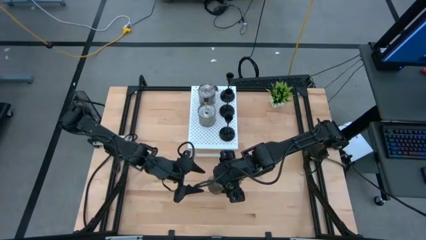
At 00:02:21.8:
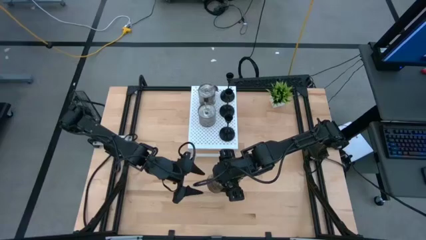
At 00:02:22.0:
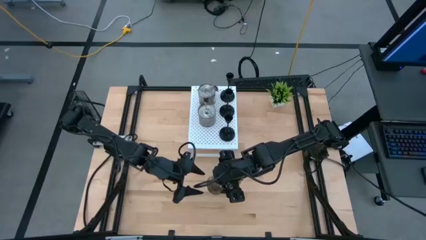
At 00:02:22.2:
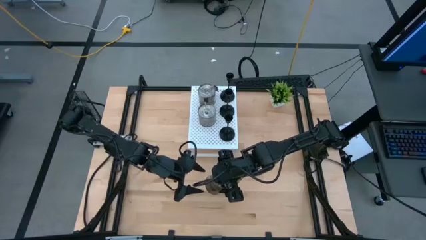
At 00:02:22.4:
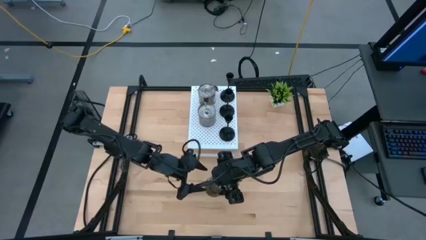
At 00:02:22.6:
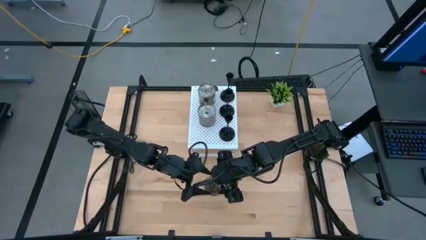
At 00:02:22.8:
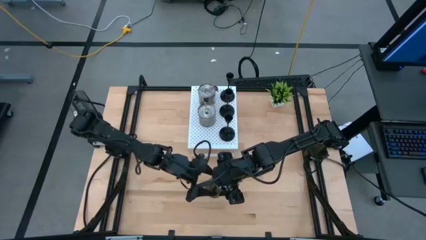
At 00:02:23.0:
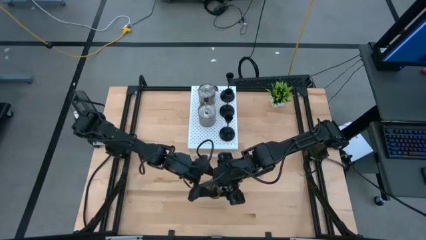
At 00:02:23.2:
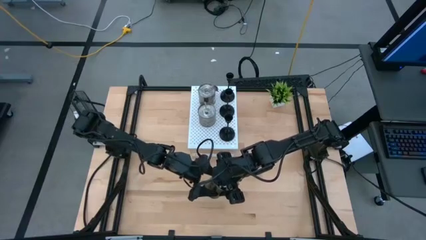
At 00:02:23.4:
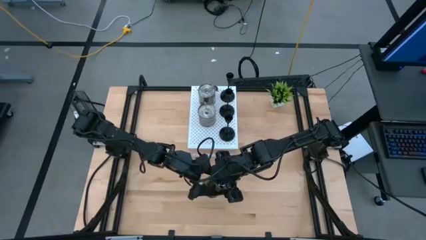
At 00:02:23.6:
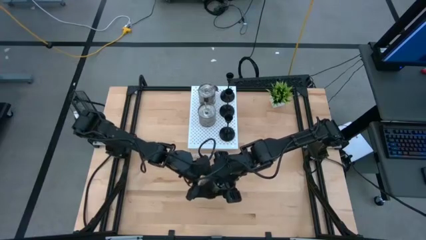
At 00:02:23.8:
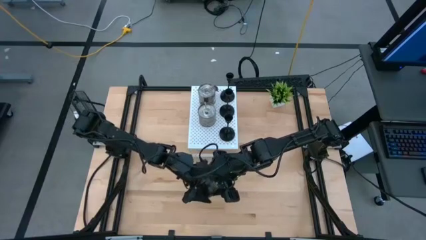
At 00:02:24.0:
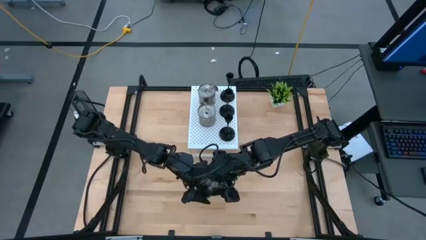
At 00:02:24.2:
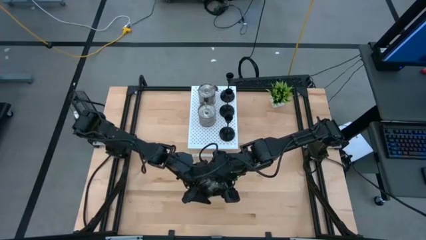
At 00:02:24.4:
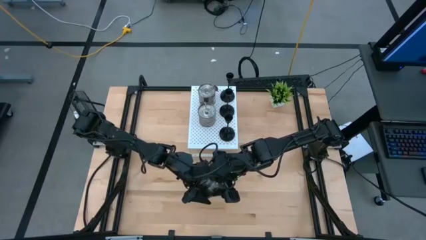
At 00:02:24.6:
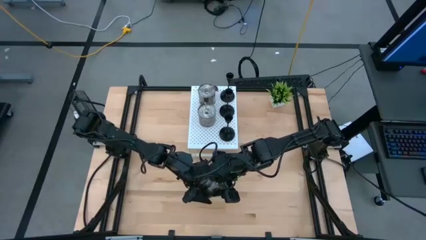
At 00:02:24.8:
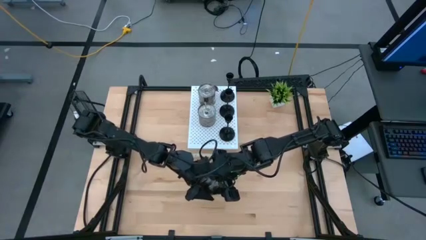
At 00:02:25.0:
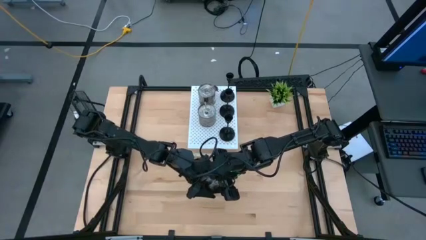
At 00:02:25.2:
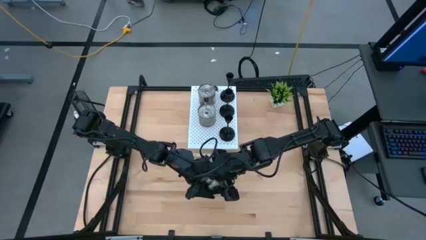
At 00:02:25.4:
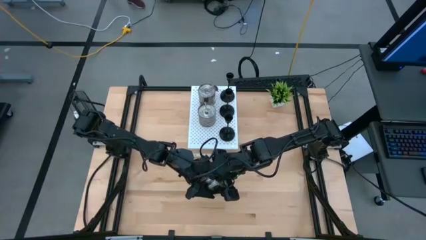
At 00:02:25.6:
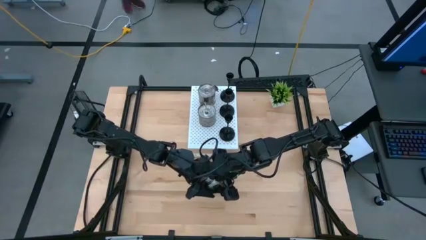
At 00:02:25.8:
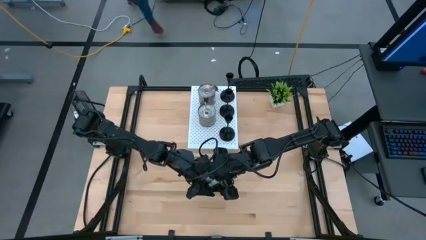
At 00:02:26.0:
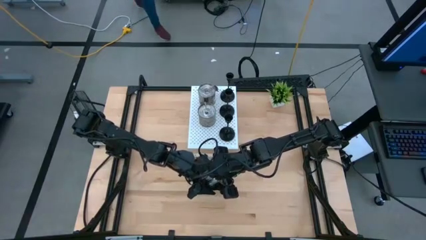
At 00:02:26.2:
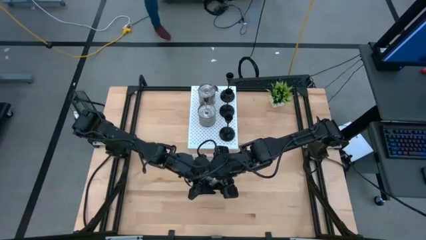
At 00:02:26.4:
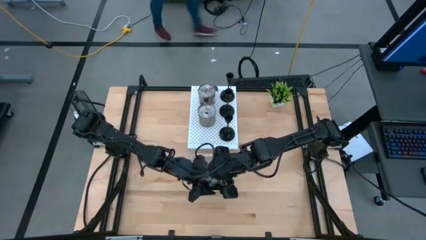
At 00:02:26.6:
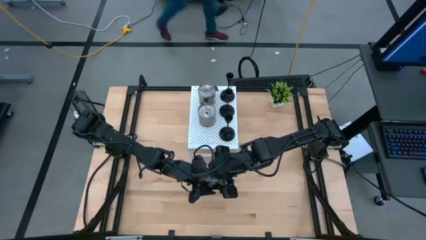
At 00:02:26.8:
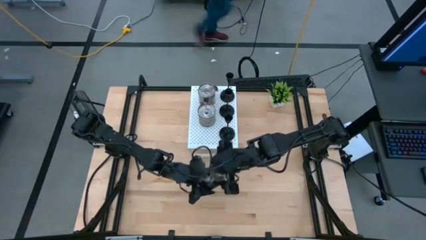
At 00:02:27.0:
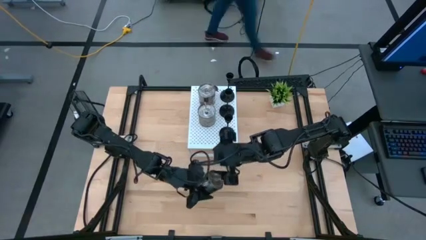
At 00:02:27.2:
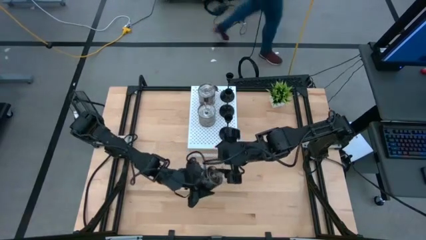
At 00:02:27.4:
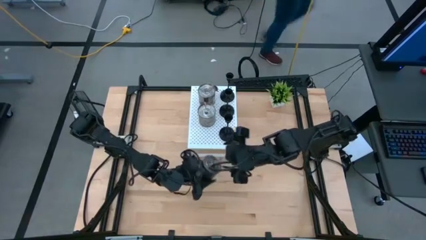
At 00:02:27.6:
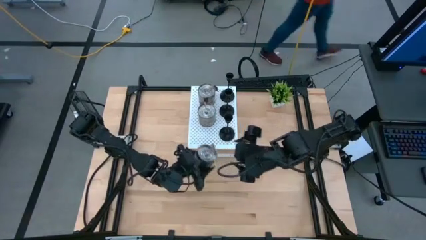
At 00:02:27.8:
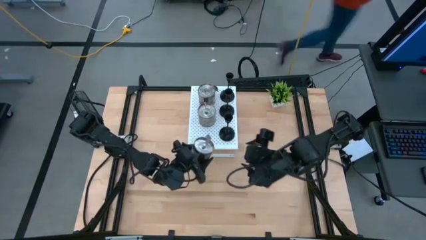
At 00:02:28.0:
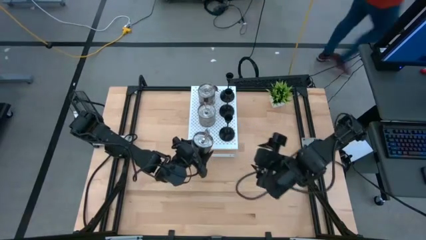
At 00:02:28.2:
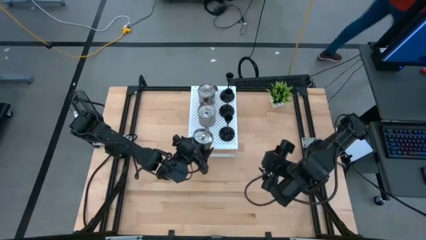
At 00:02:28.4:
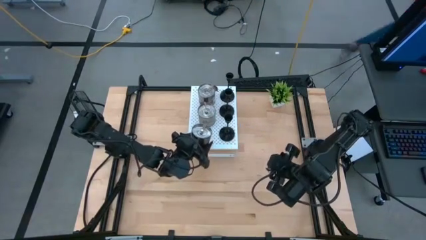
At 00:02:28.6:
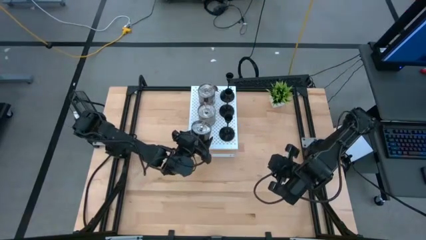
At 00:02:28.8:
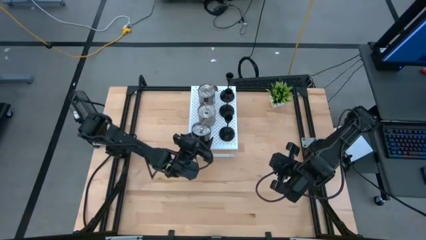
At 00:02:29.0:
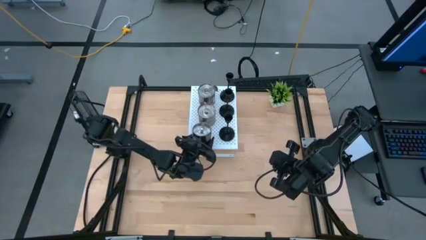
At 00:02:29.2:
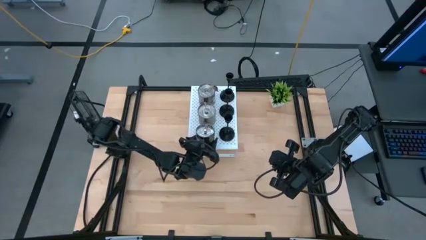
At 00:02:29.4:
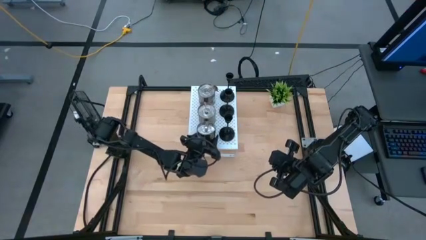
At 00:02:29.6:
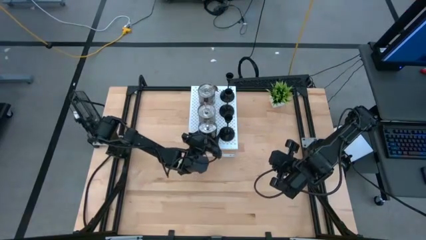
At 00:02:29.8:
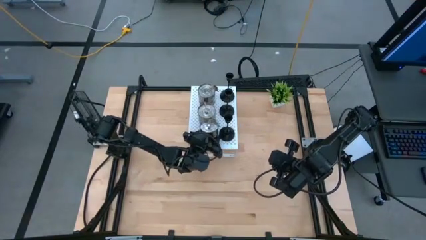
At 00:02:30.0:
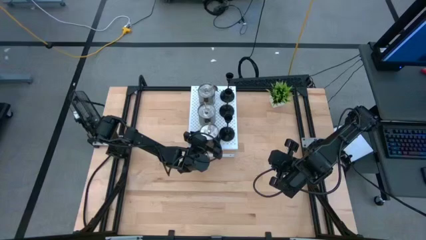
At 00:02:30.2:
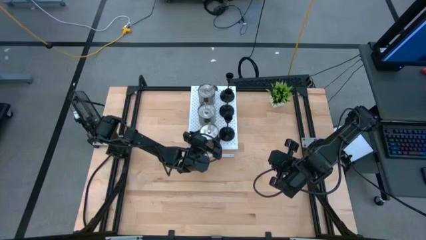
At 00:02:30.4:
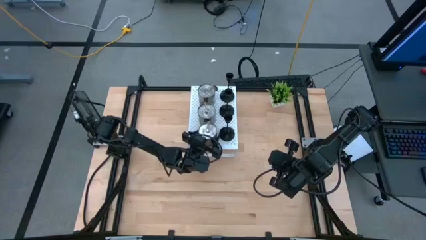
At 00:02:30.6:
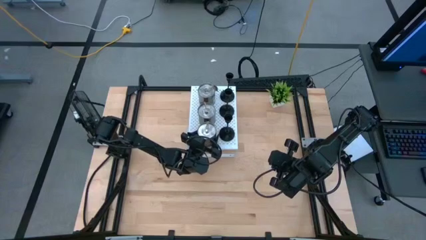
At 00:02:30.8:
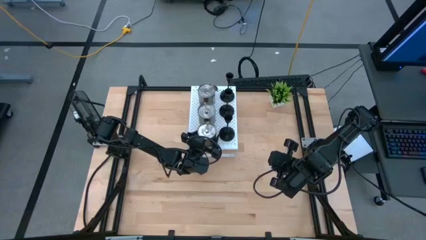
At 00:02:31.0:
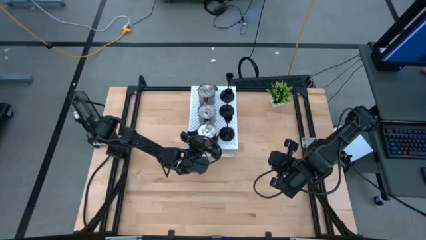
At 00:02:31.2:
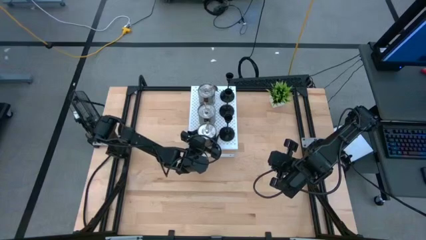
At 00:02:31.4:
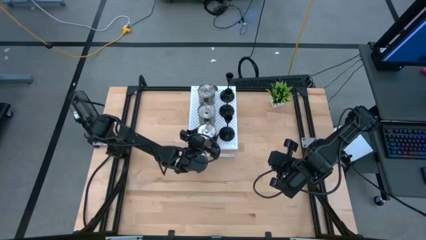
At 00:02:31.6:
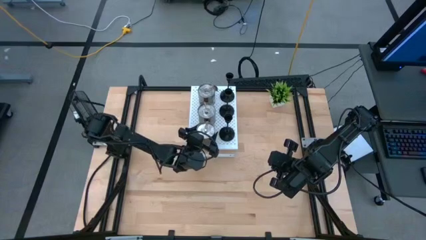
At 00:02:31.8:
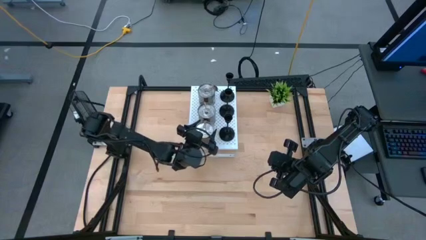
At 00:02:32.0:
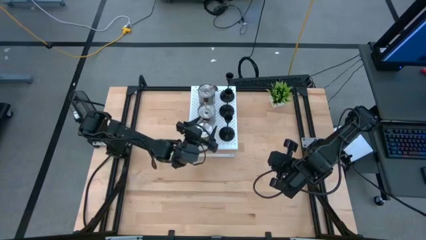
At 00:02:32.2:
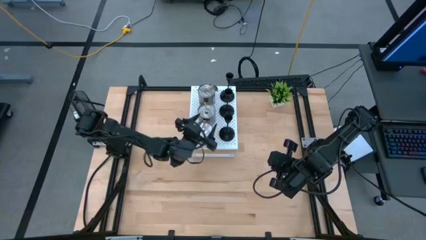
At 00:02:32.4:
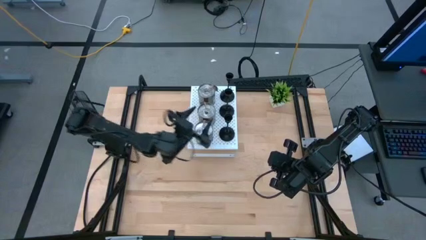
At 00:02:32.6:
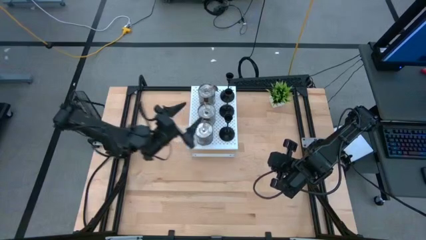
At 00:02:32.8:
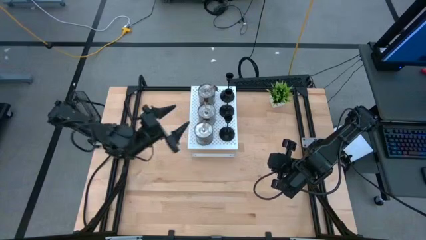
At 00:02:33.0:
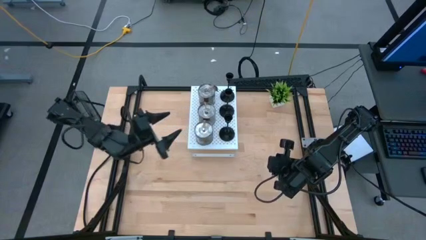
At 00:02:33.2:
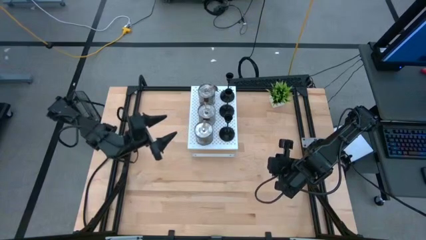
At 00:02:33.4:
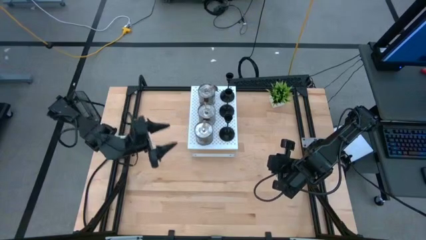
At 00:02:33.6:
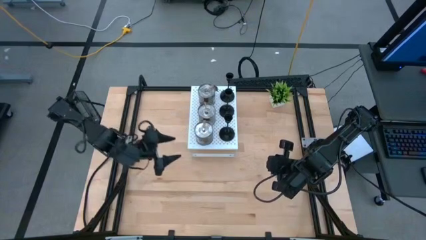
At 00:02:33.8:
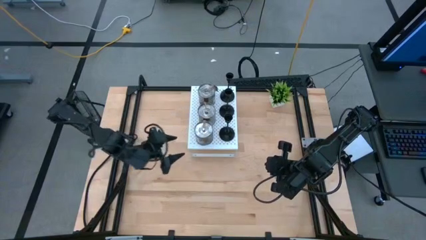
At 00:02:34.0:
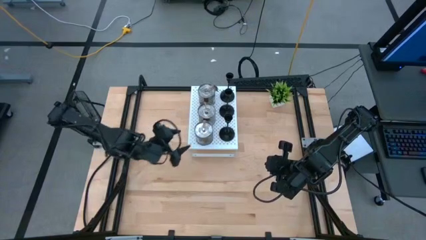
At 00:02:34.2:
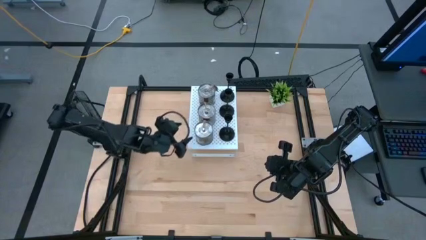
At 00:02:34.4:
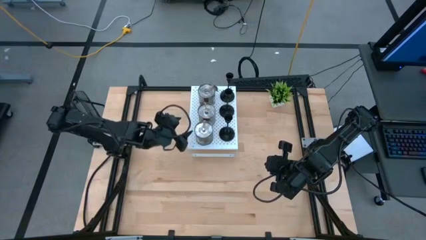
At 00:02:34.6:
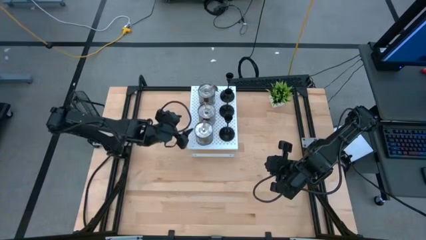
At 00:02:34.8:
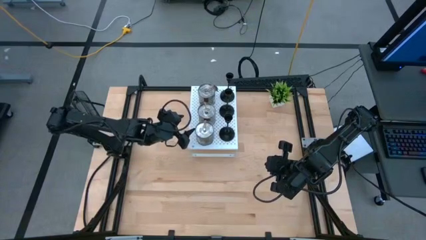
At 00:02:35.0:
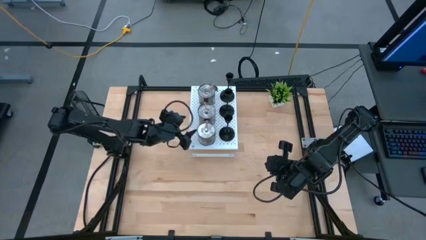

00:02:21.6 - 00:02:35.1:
Task: Pick & Place candle stick holders
Put the silver scented candle on the shelf aligned with the other silver scented candle

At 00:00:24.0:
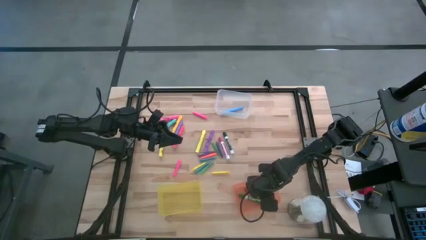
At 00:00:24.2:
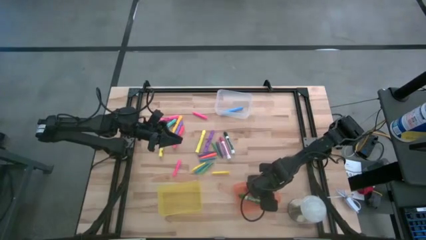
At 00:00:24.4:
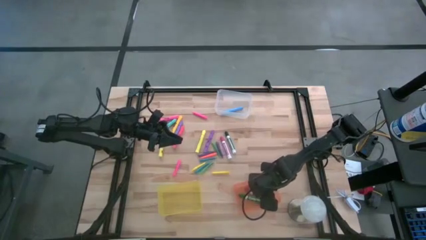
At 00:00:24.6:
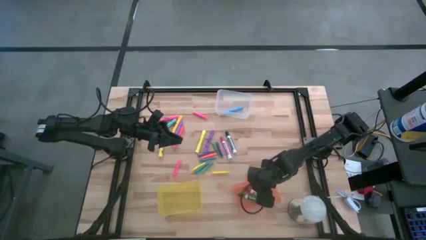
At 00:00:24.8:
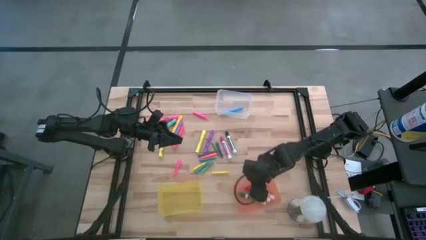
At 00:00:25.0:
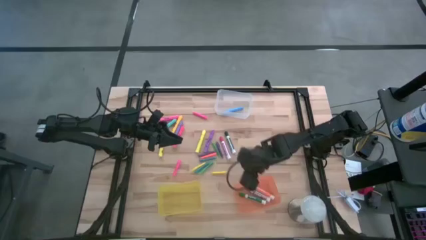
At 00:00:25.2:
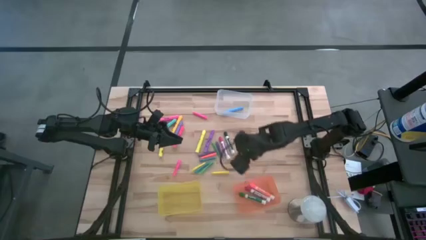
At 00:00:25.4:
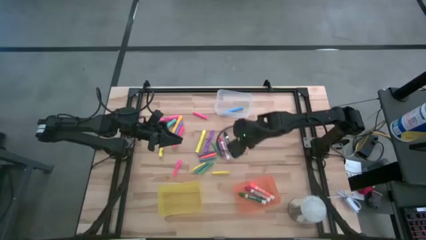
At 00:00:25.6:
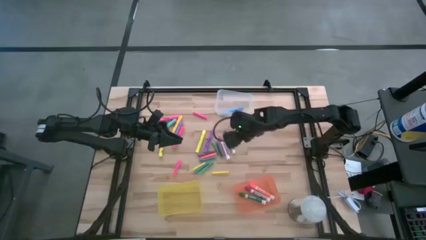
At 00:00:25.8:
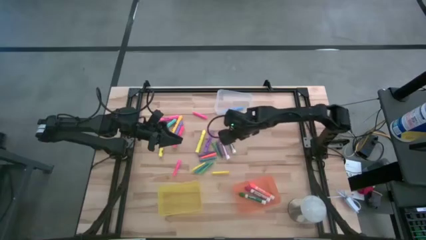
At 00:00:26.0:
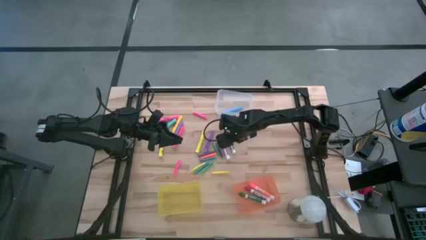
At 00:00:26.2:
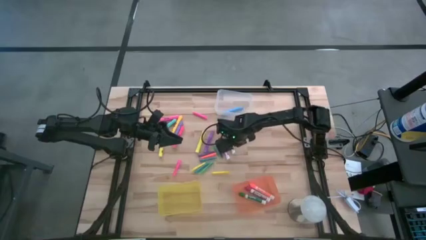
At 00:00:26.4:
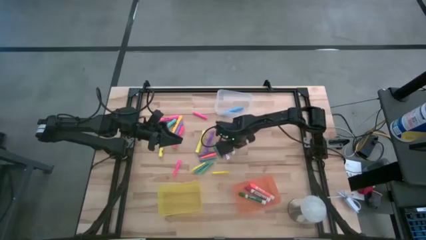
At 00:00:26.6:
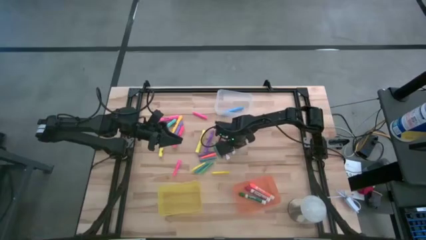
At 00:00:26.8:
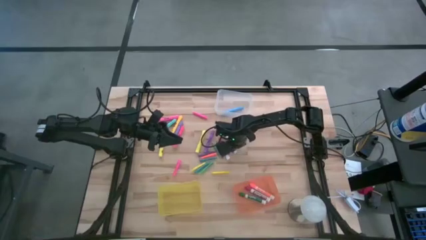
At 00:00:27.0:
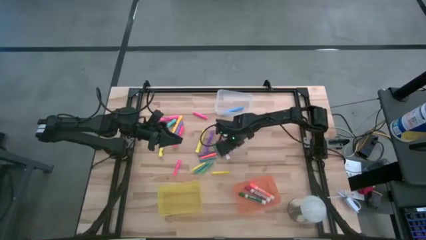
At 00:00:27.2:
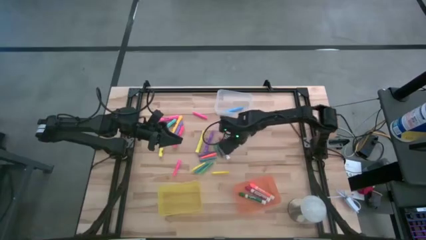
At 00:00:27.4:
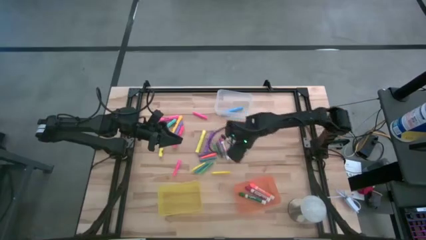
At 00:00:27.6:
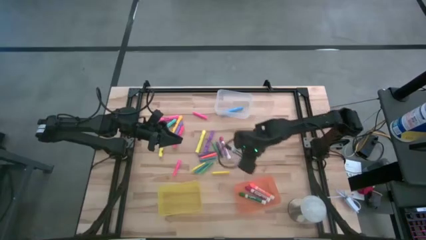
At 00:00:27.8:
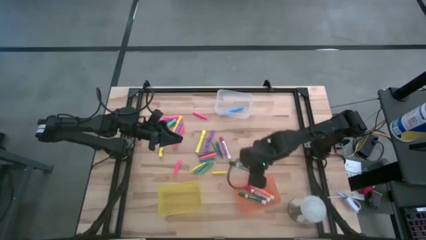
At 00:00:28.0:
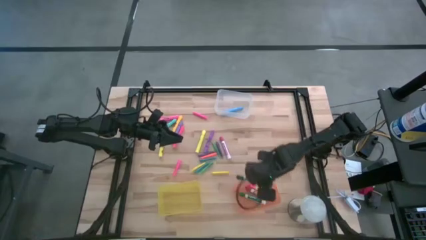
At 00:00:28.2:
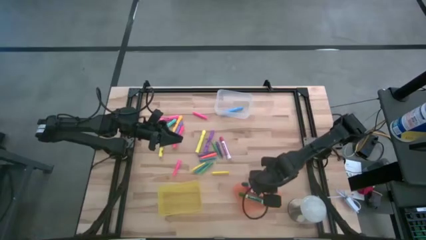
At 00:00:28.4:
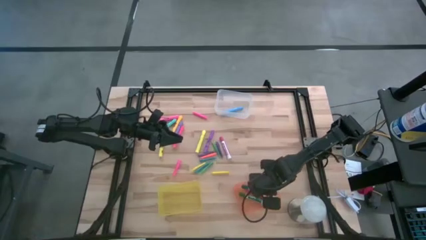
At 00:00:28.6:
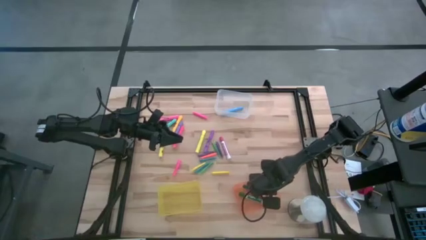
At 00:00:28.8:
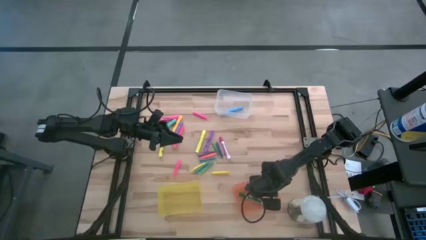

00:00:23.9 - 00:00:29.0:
Task: Pick & Place Markers
Put the green marker pen into the orange bin
